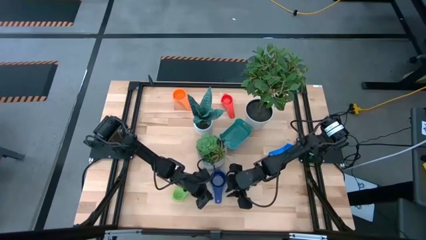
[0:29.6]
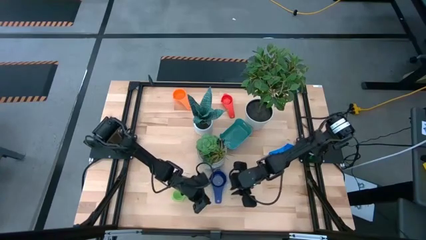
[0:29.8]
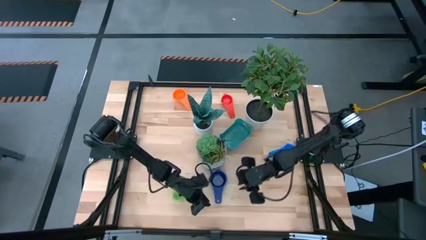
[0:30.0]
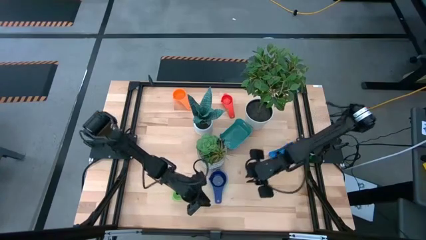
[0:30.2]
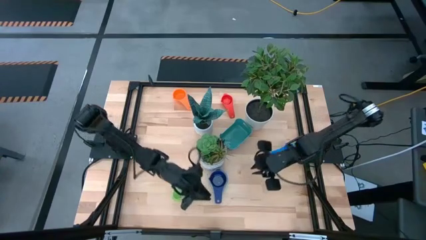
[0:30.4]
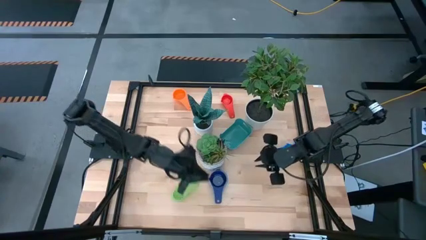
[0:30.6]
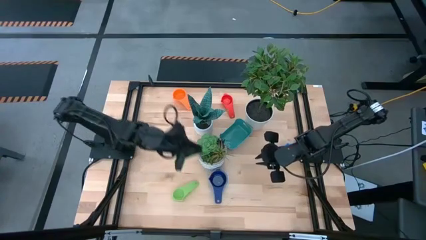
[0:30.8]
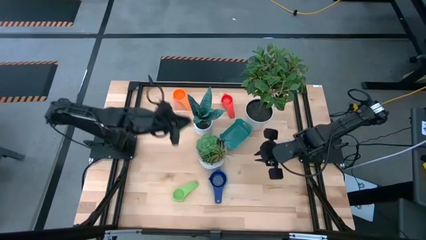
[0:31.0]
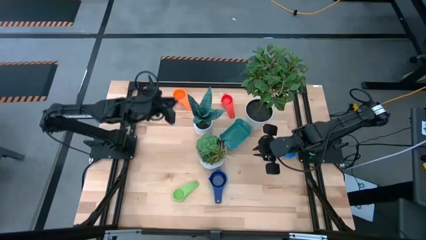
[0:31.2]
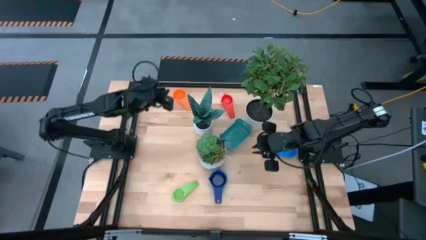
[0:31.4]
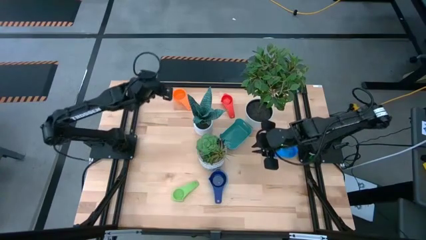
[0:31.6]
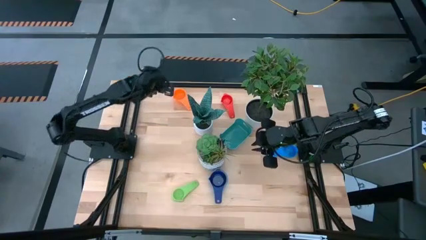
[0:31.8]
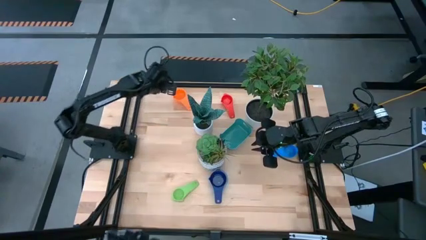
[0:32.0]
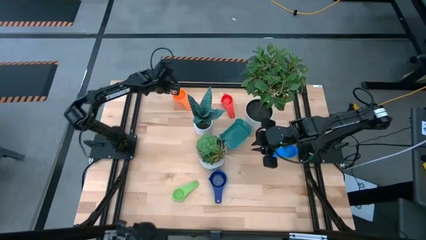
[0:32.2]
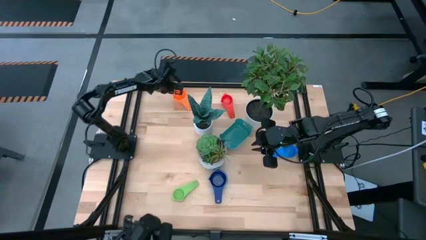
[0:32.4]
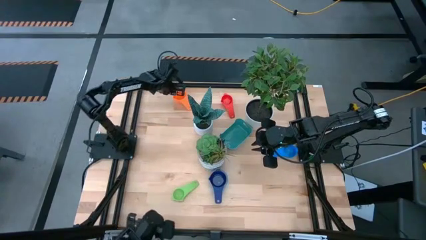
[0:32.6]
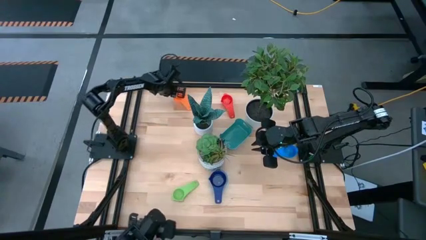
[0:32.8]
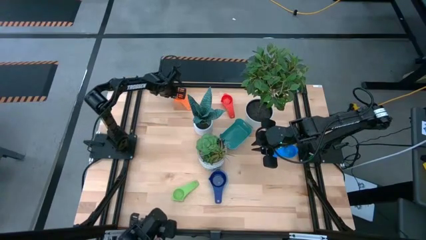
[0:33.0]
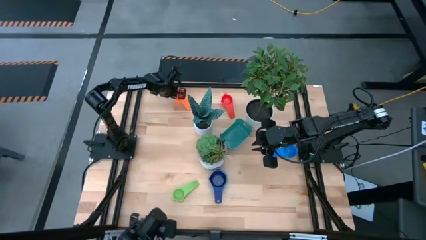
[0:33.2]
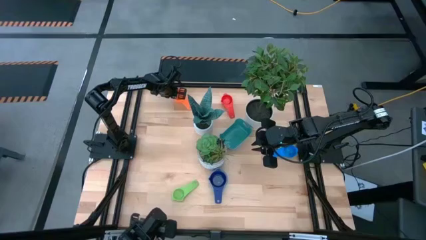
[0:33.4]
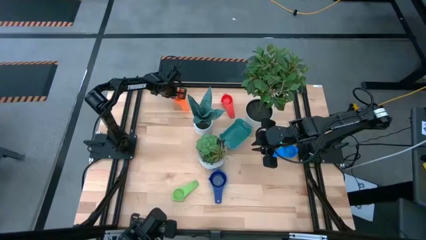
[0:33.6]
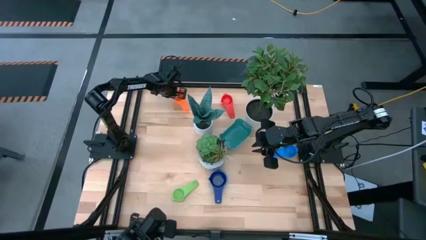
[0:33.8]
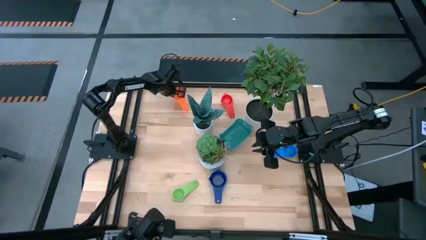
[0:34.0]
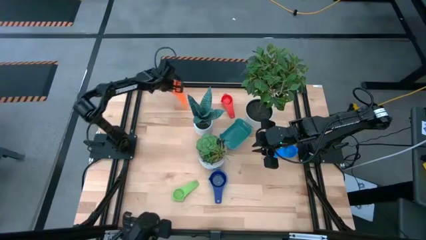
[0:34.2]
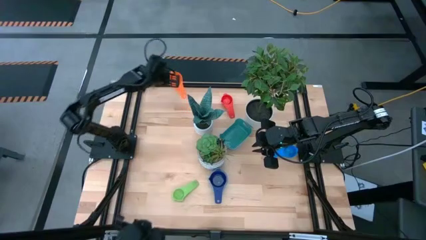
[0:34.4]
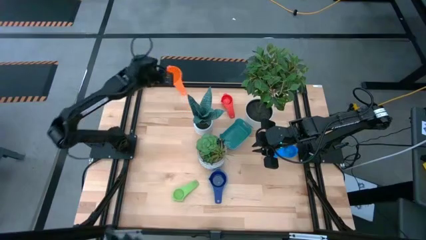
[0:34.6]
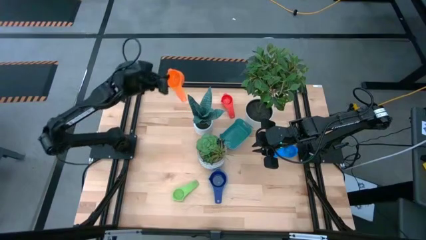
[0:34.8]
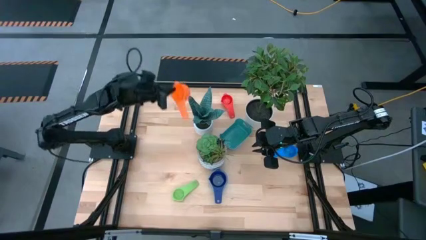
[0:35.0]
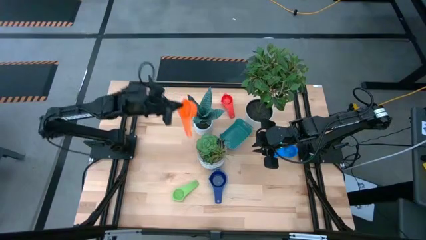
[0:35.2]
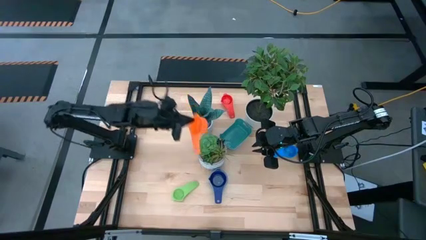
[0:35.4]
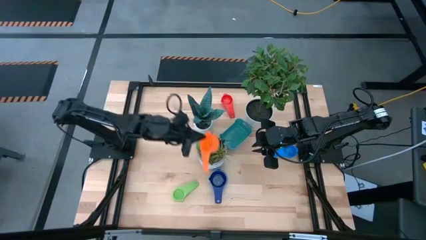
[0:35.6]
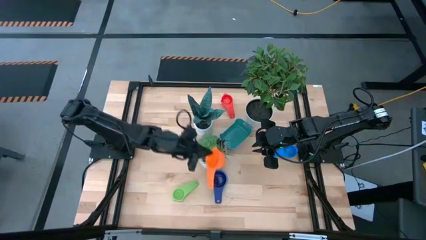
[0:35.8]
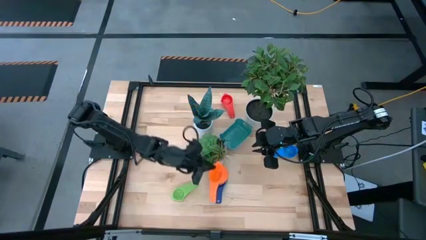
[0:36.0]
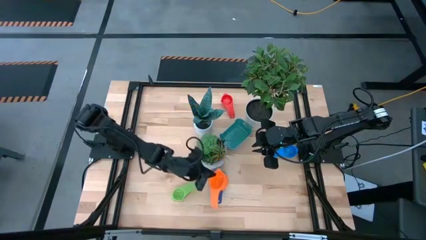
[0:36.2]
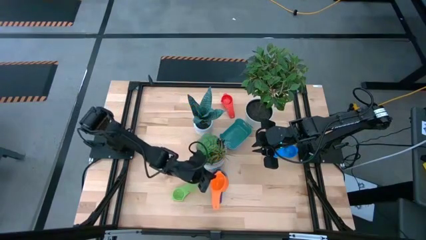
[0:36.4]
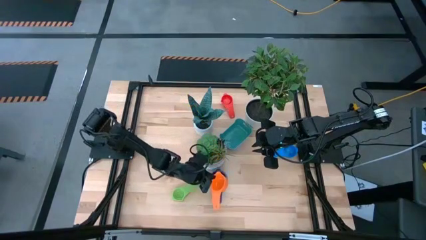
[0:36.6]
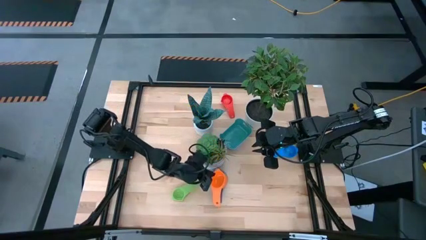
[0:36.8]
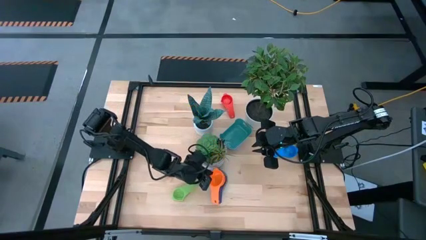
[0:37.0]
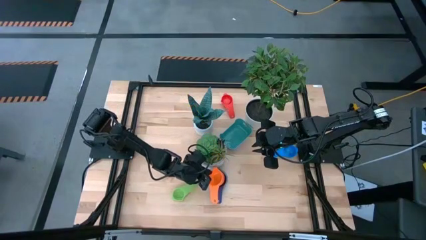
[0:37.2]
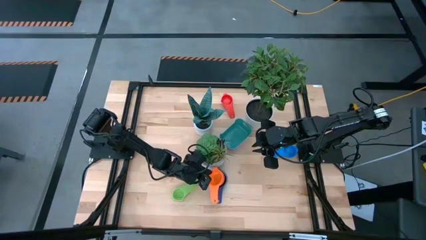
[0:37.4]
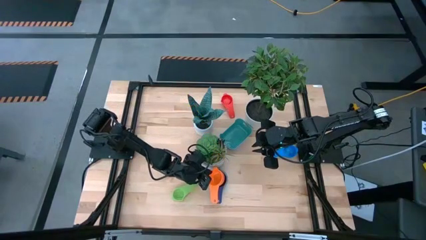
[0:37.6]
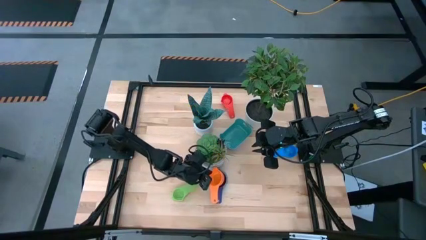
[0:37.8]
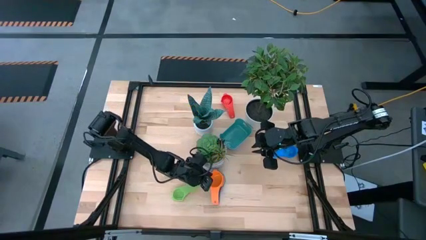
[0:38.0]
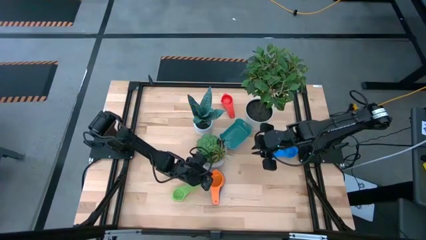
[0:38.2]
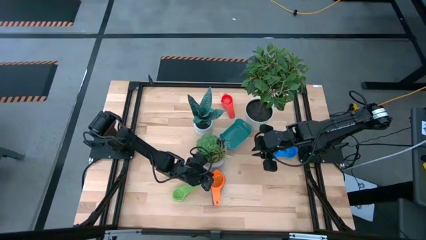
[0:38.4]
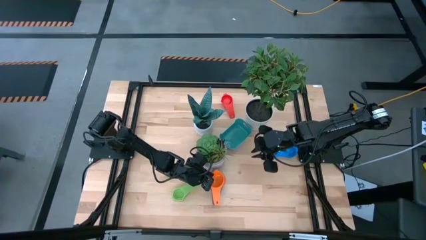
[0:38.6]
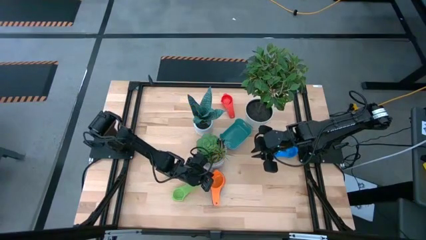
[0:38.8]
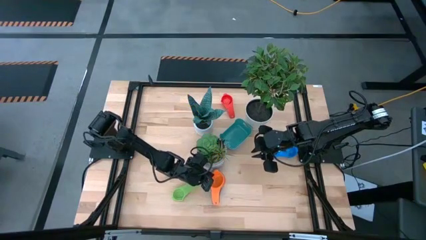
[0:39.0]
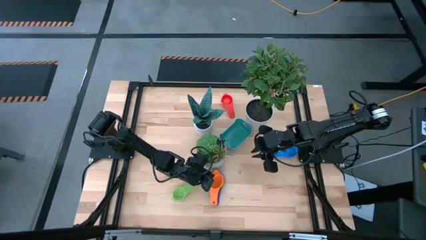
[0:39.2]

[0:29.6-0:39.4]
Task: Nest measuring cups in basket
Stack the orange measuring cup on top of the purple measuring cup

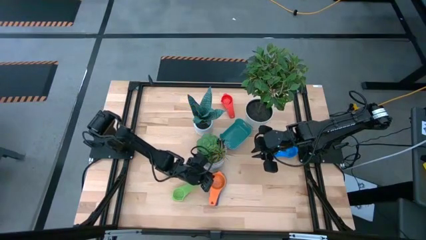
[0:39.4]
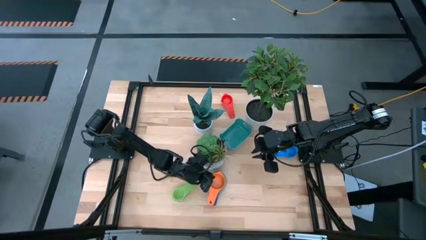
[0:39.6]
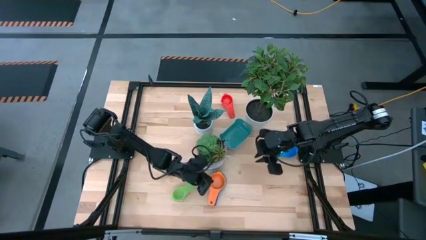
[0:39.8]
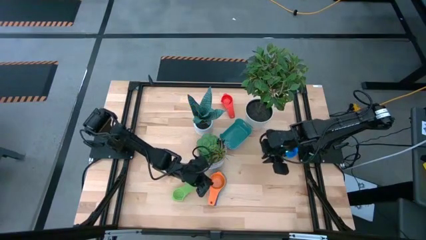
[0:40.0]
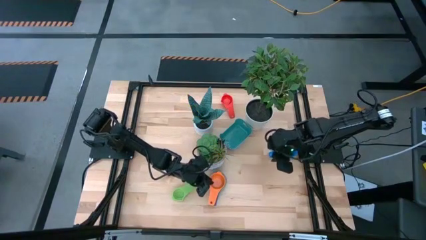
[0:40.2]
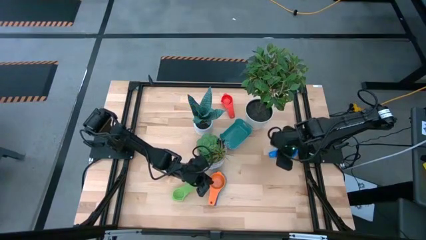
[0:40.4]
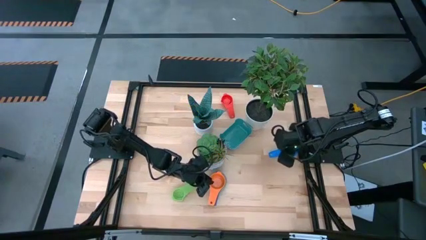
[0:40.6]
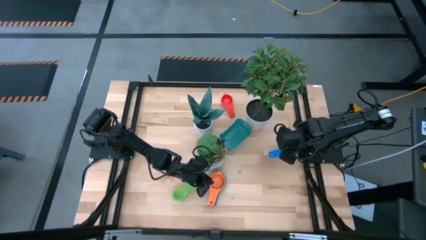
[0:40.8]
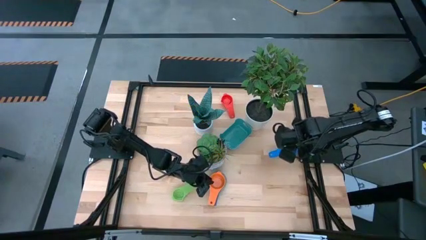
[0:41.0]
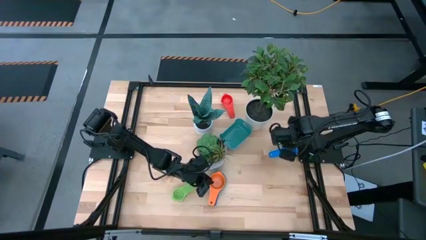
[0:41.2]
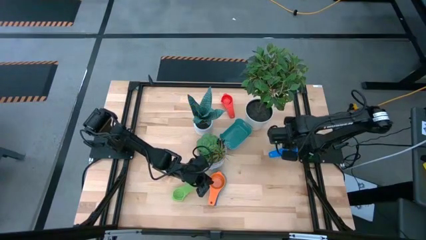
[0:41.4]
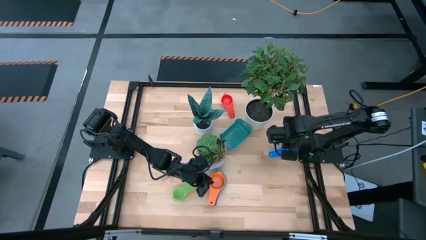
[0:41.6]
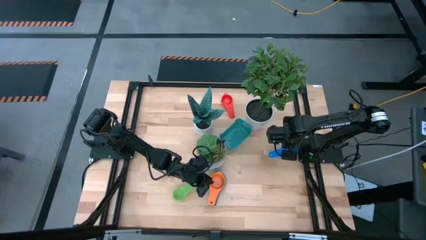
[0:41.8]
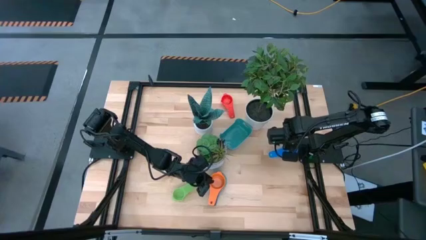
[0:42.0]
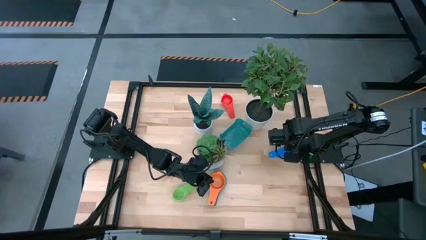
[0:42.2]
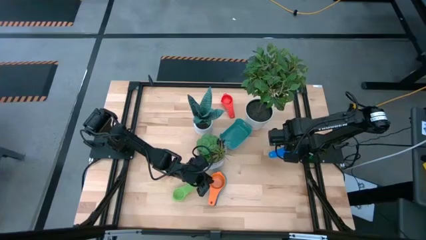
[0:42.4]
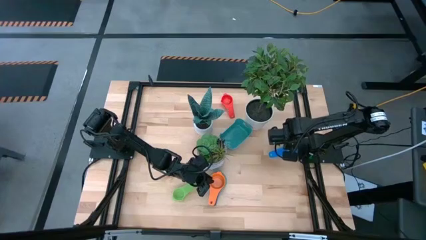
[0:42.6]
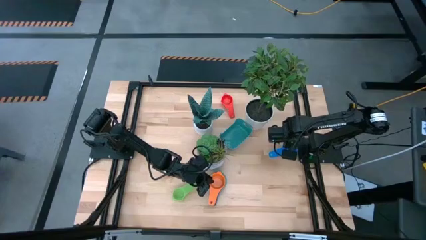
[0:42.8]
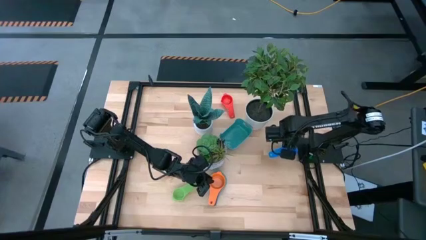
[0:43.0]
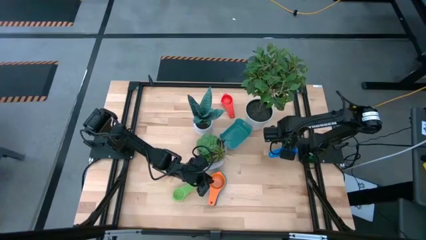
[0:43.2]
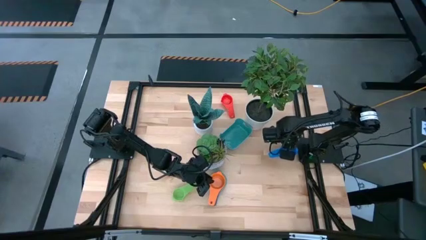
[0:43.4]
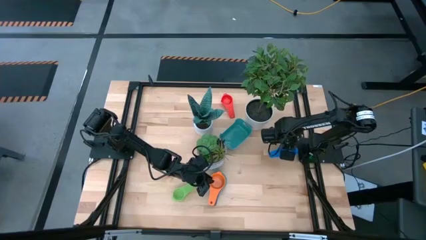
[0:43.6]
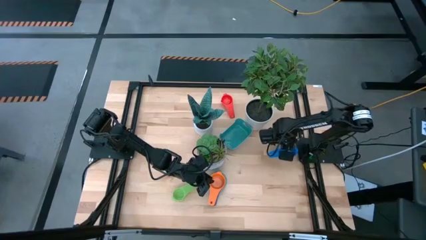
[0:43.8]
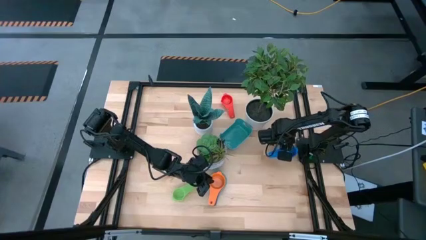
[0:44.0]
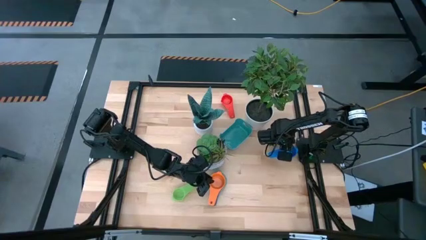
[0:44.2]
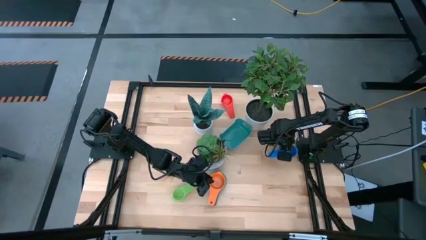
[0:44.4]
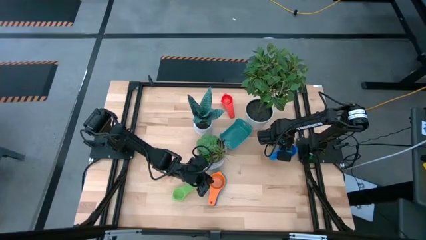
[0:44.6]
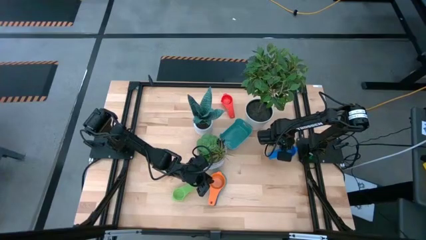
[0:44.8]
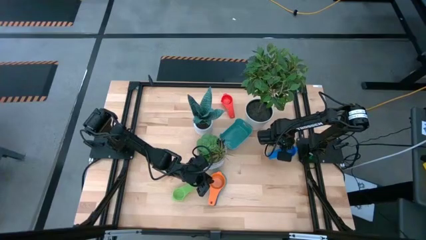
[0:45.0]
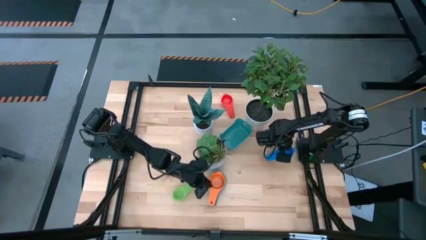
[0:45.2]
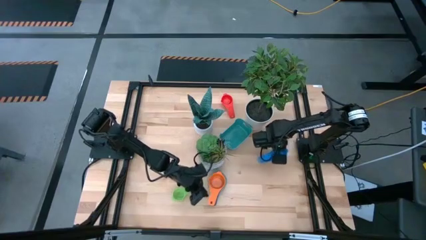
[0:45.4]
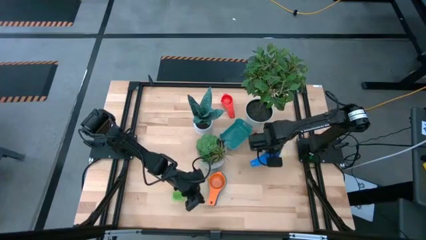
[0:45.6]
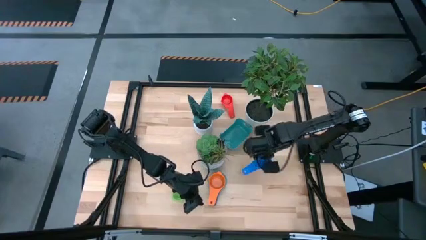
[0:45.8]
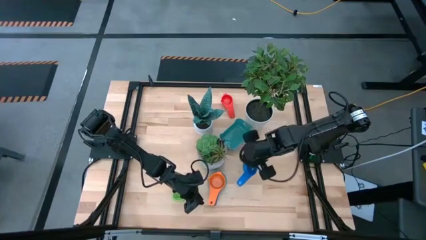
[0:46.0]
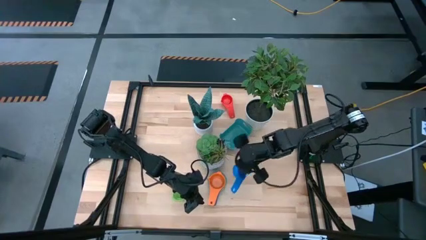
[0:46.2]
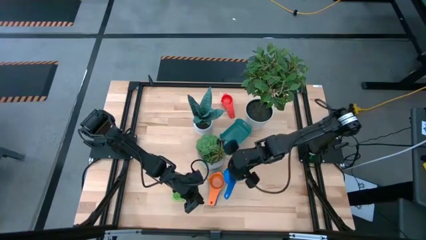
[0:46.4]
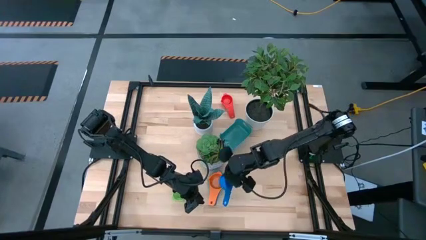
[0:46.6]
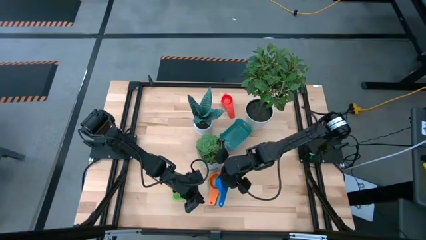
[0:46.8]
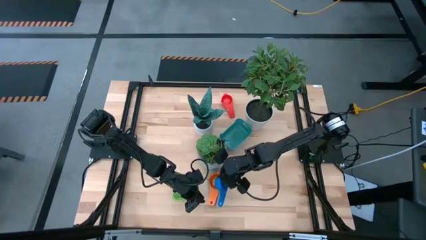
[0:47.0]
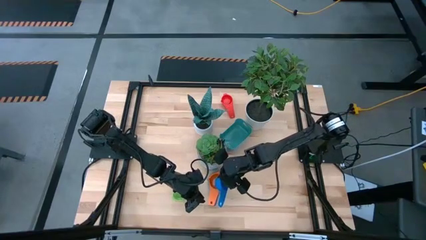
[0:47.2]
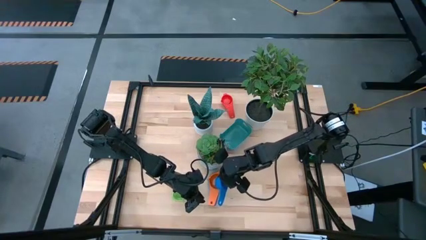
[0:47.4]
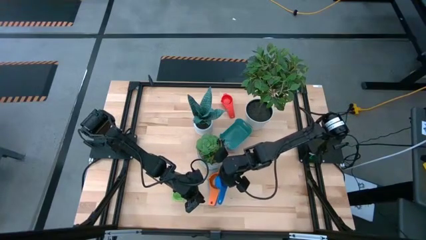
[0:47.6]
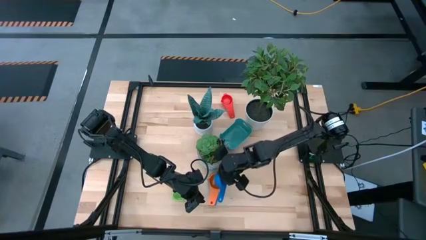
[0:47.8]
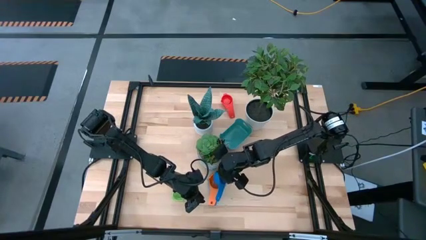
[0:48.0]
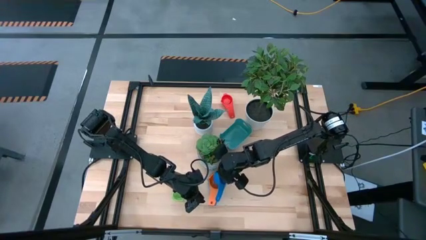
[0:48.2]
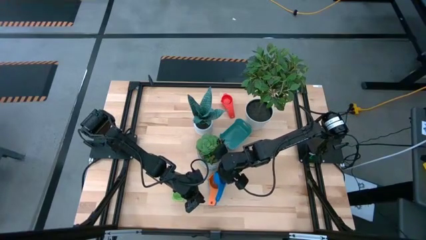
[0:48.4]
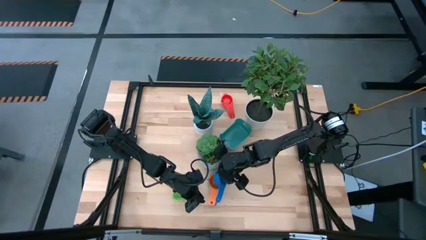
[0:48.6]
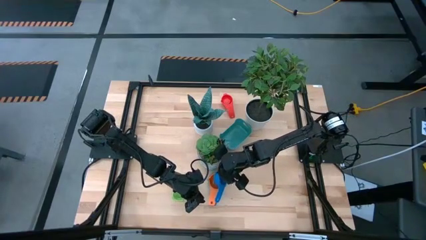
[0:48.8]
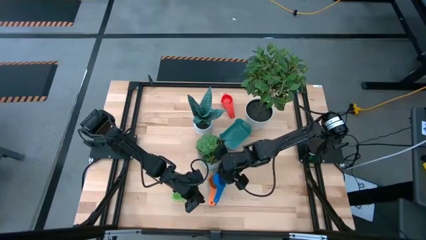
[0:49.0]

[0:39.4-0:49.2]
Stack the blue measuring cup on top of the orange measuring cup
